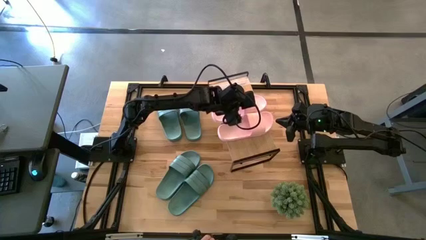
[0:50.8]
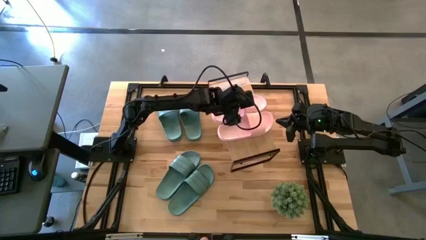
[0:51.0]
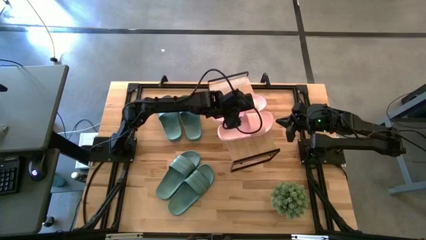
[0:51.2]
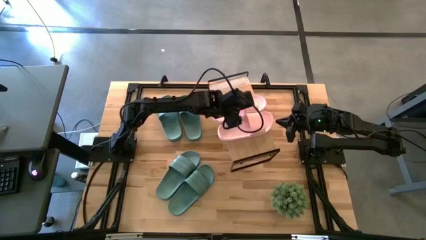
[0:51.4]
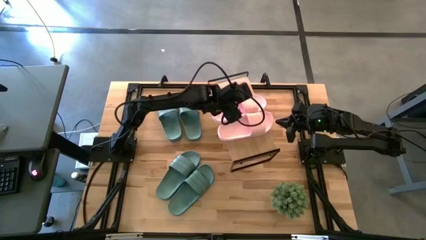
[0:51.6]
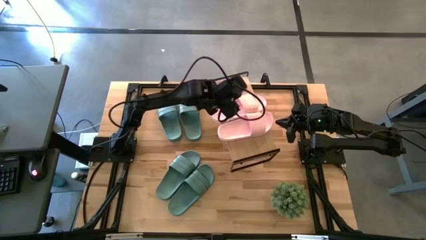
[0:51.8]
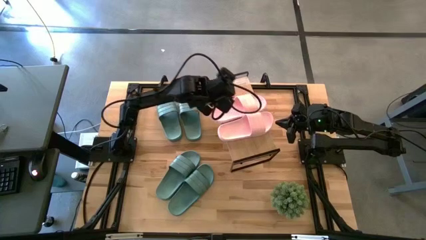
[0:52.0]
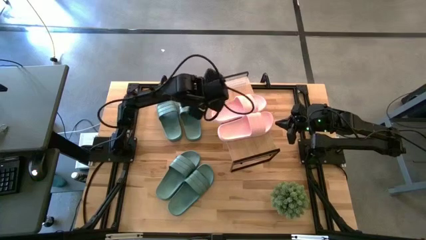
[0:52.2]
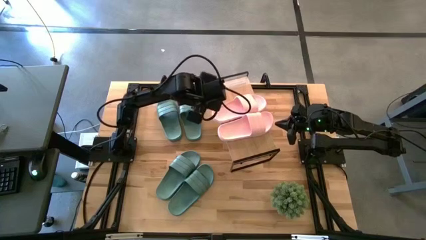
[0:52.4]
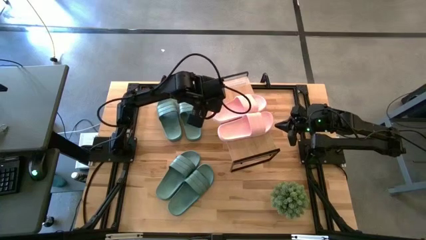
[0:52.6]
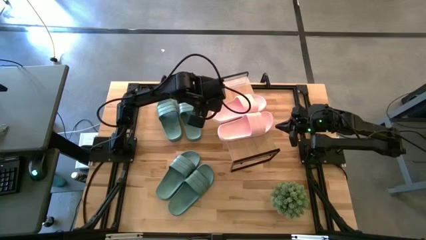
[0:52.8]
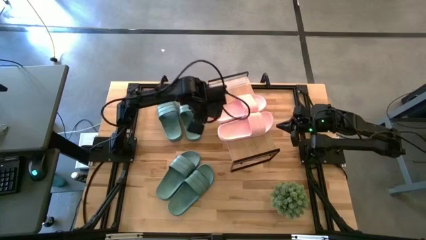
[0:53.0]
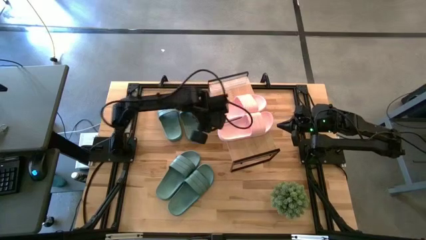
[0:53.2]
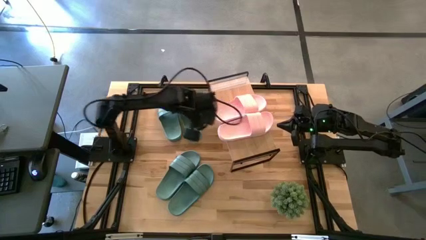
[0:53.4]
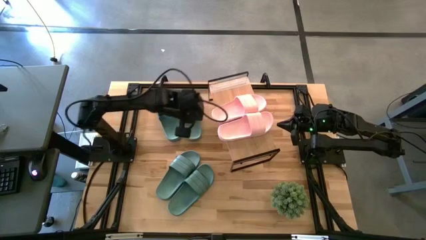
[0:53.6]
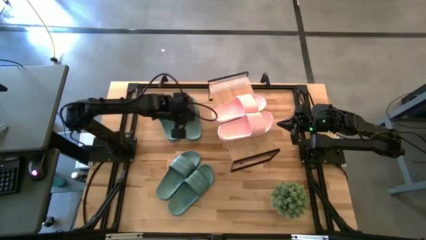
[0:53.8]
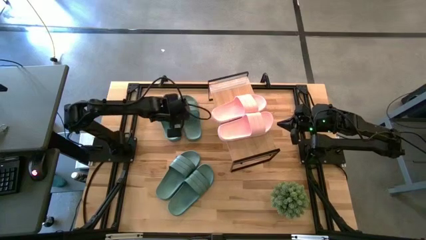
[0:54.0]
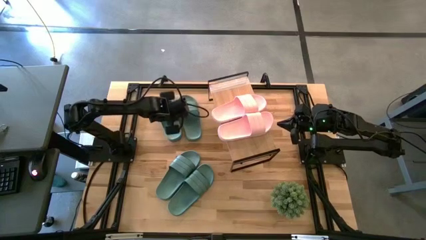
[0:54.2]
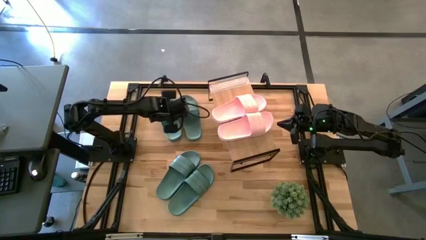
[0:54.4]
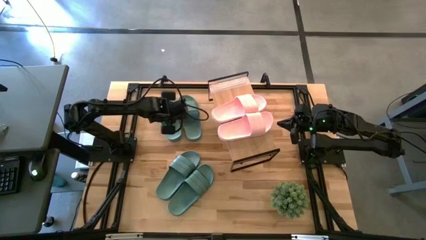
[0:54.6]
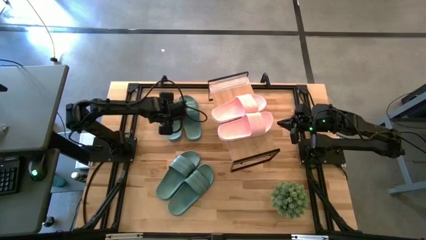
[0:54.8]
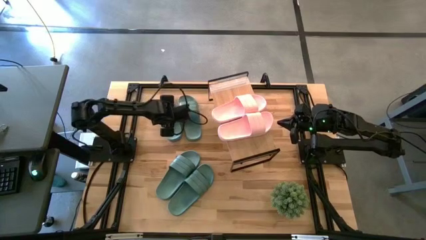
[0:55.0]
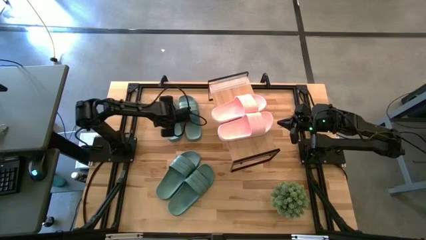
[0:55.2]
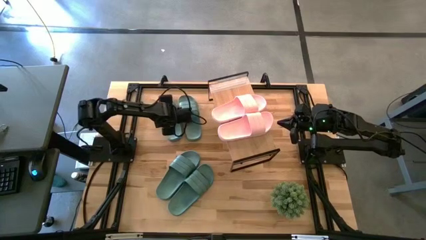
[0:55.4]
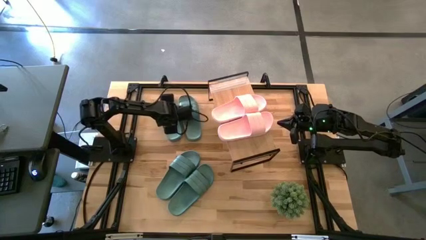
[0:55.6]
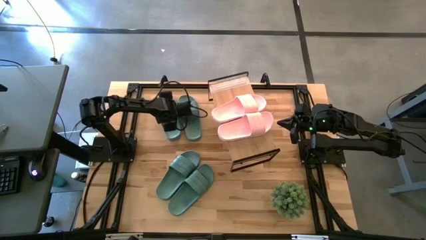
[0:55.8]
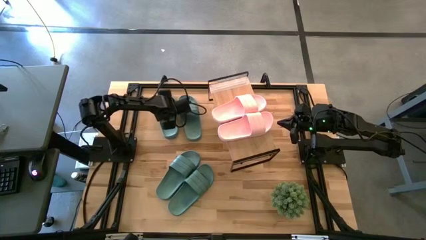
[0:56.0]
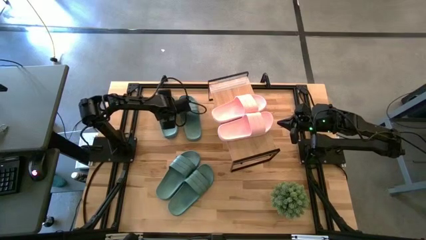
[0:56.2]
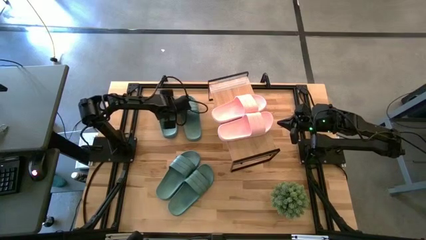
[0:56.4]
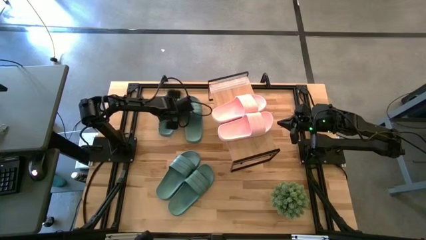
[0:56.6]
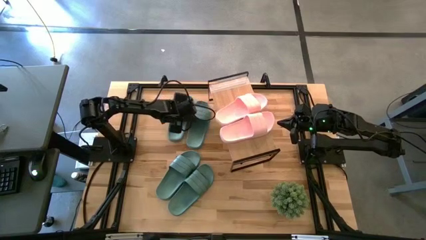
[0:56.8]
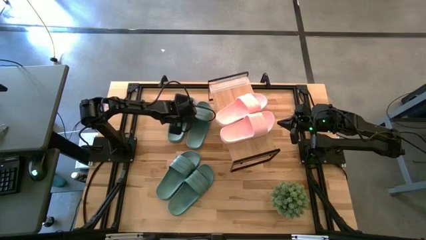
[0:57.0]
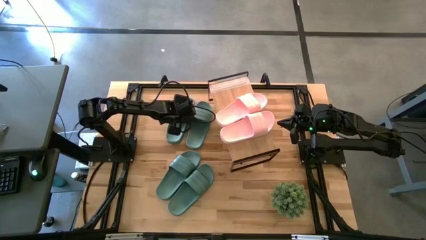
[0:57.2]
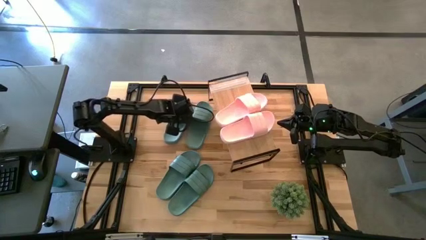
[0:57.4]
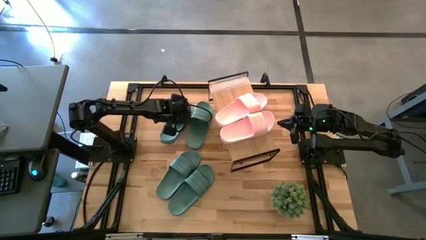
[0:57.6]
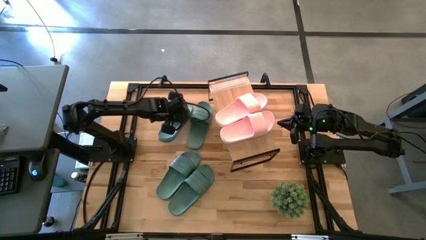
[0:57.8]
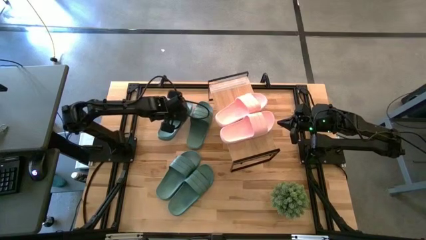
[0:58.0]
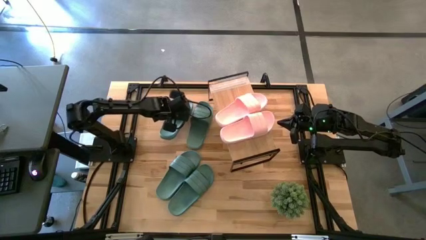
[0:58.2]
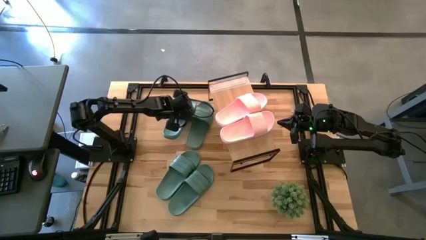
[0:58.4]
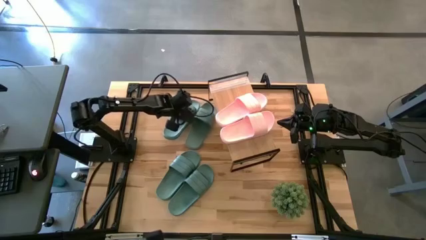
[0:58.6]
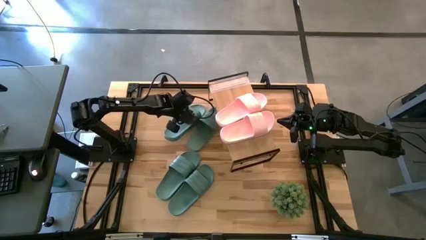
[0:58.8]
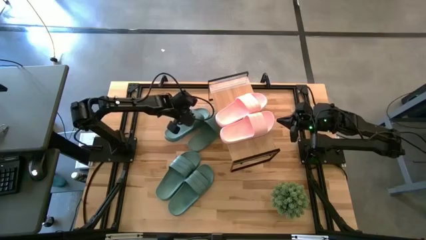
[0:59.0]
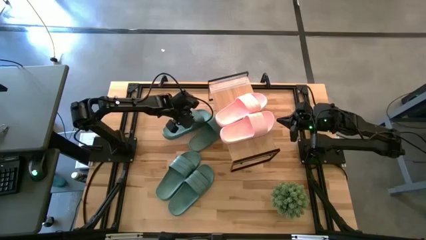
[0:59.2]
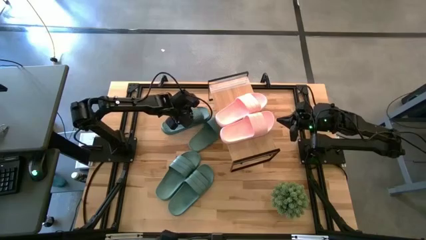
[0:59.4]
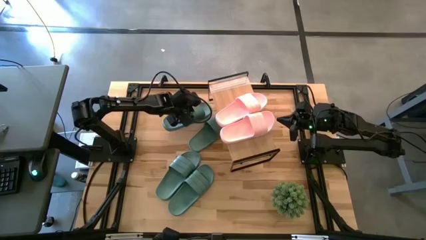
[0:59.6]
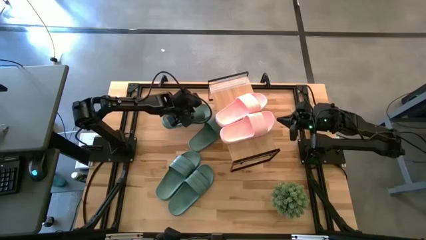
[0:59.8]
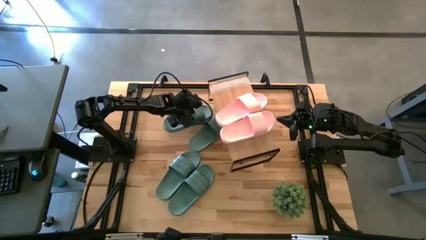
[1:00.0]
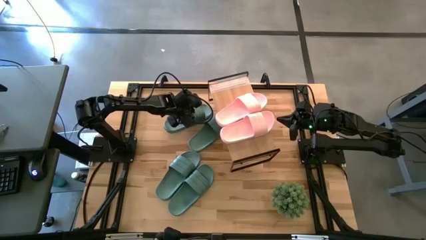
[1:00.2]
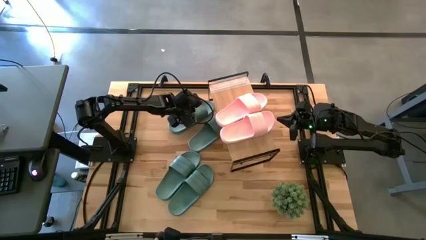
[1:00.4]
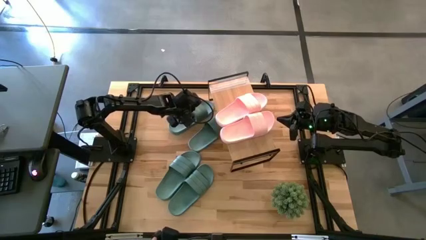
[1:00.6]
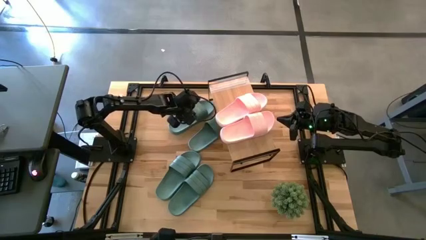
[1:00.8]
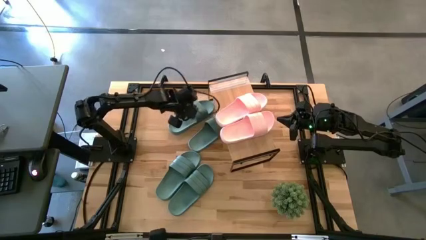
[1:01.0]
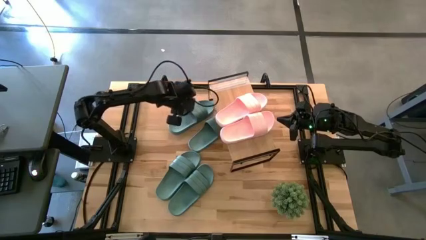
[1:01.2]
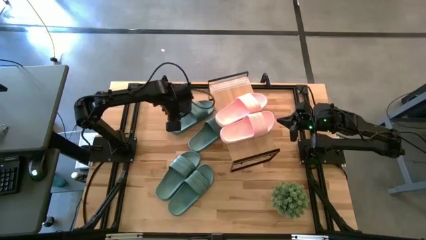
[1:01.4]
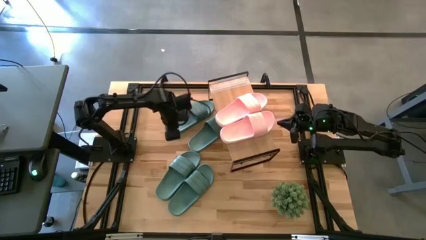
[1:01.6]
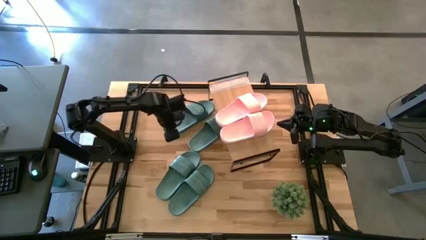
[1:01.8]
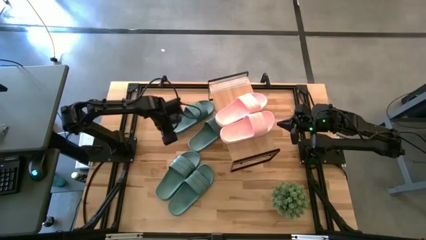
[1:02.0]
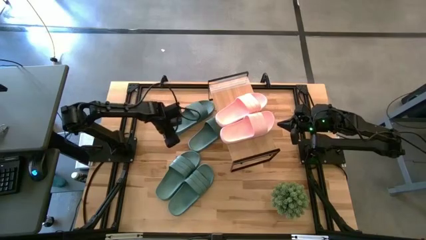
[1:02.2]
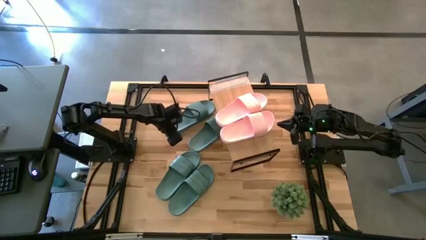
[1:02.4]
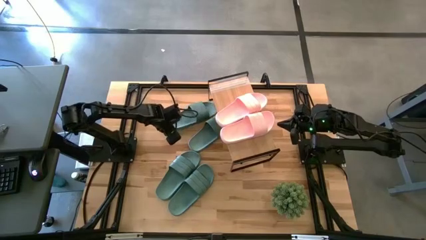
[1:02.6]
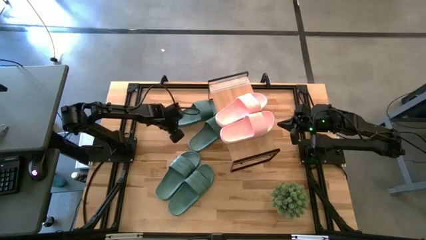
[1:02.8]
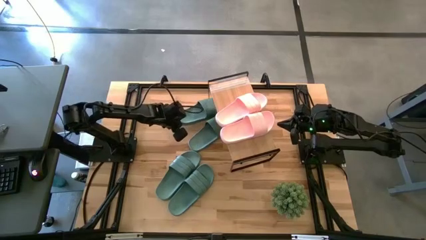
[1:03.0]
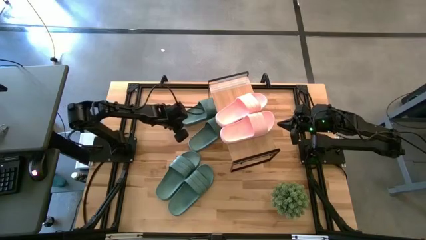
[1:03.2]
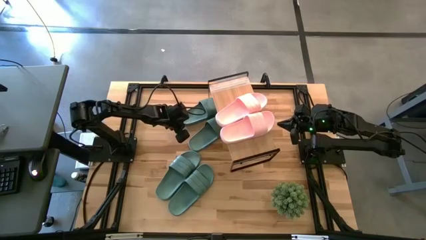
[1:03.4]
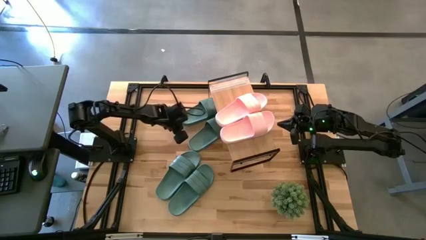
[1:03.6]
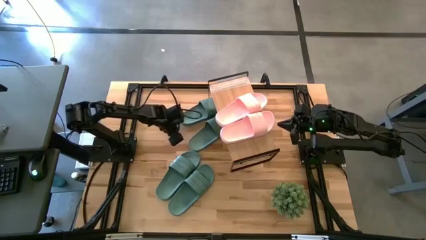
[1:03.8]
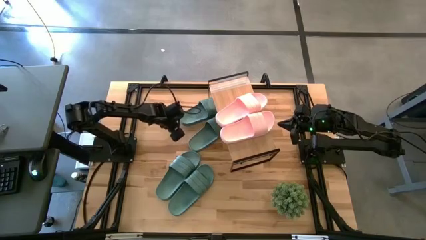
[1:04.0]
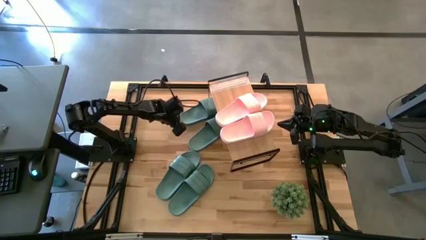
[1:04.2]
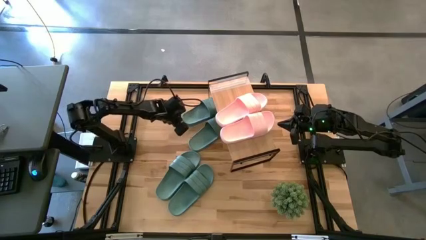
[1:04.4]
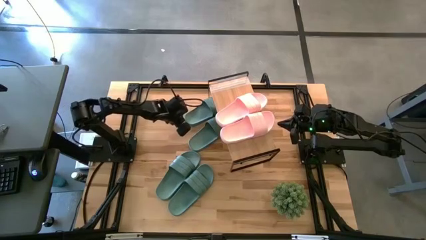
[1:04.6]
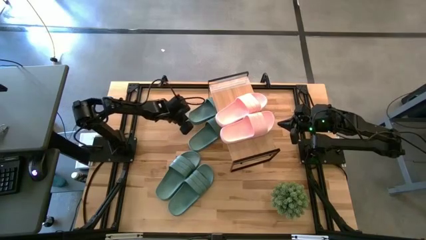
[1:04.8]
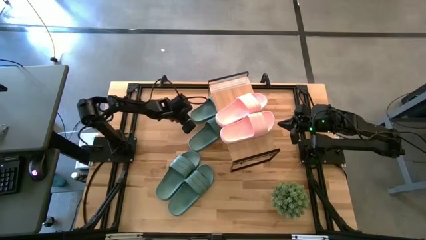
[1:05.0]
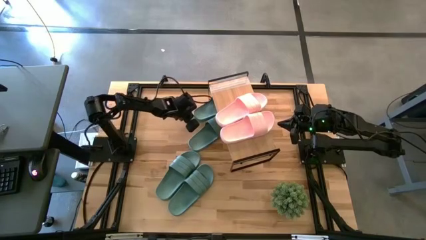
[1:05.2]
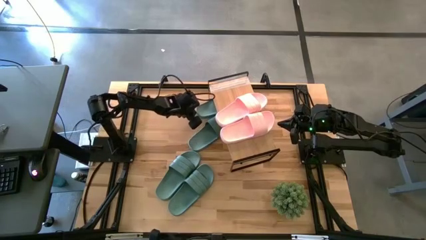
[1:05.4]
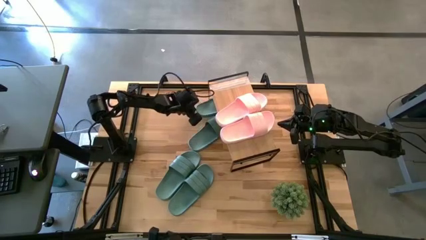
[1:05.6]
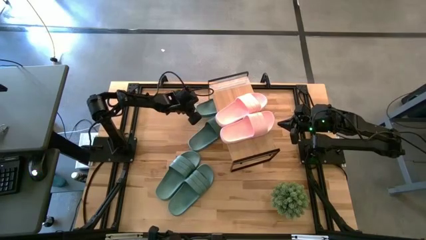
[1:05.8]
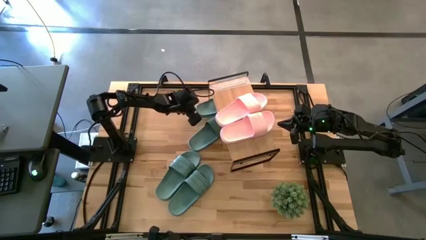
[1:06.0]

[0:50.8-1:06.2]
Task: Pick and place slides into the shelf
Put the green slide under the shelf

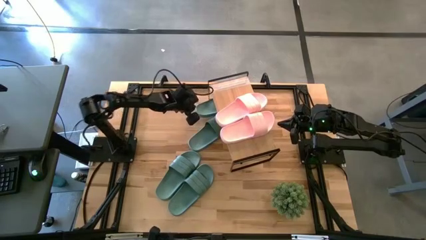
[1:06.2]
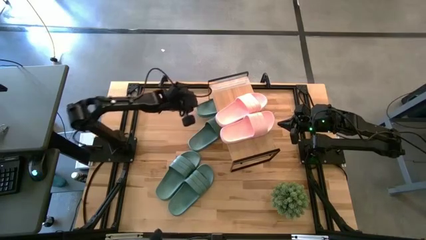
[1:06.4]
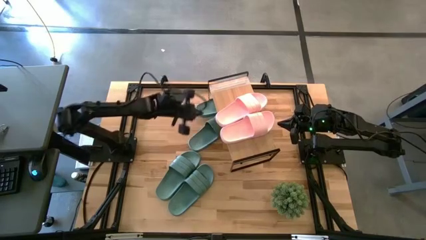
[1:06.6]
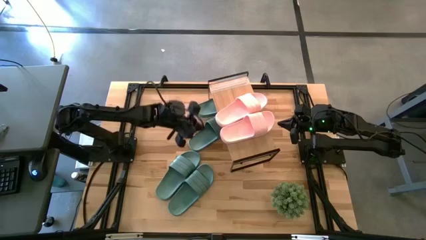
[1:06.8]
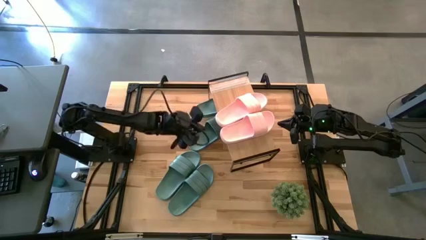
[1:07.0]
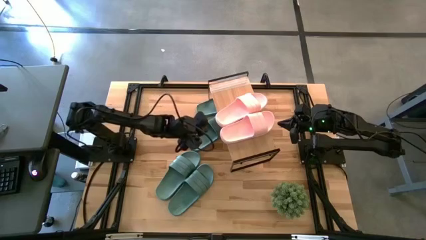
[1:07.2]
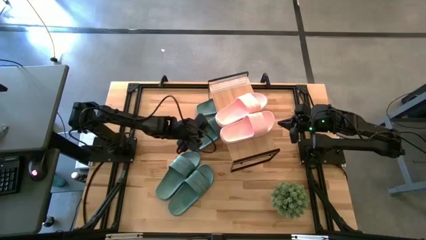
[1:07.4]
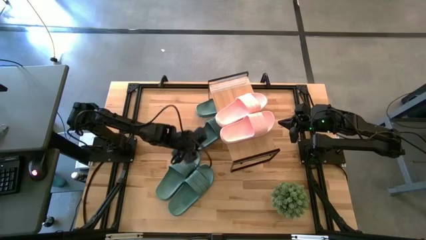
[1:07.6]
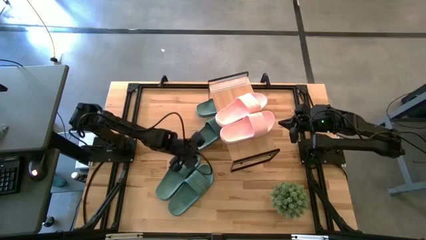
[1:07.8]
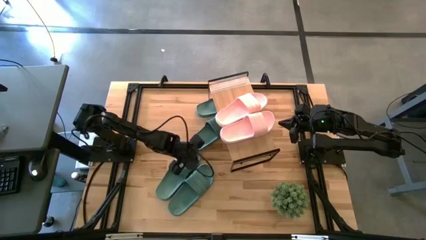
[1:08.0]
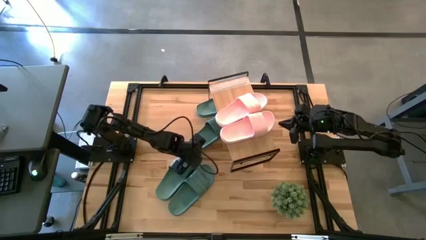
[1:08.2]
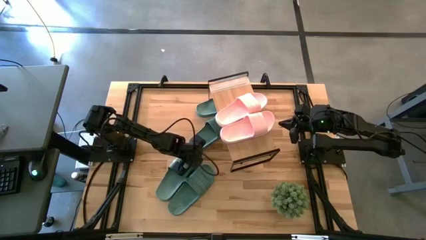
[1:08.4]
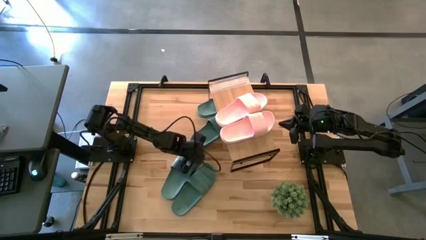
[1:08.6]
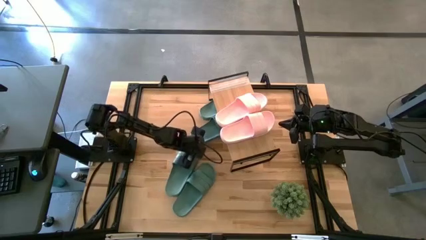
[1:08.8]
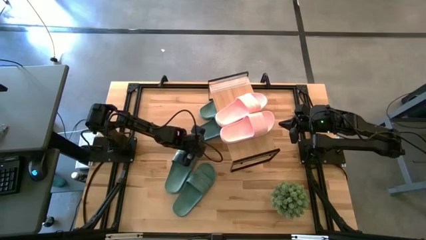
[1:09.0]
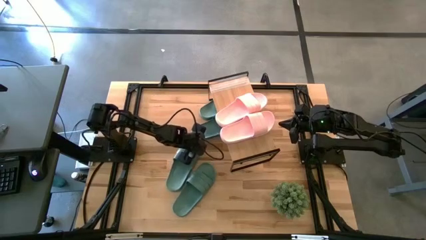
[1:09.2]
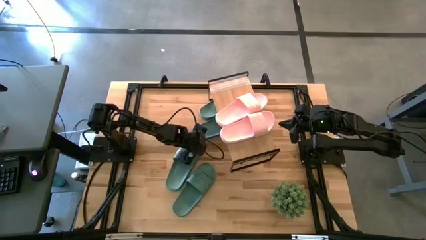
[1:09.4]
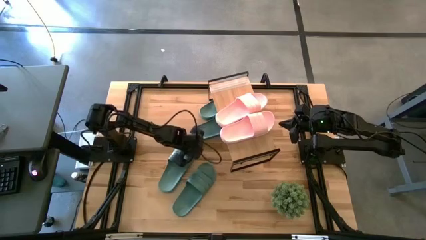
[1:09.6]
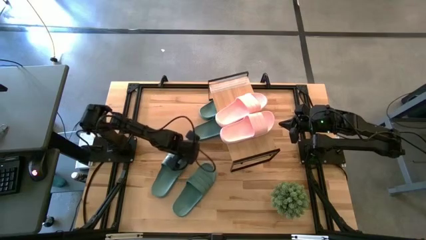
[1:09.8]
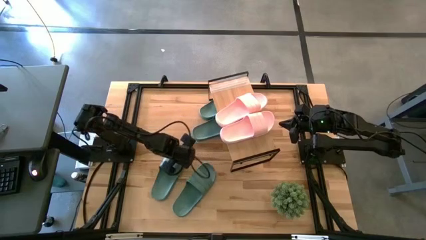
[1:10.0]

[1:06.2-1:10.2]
Adjust the green slide
